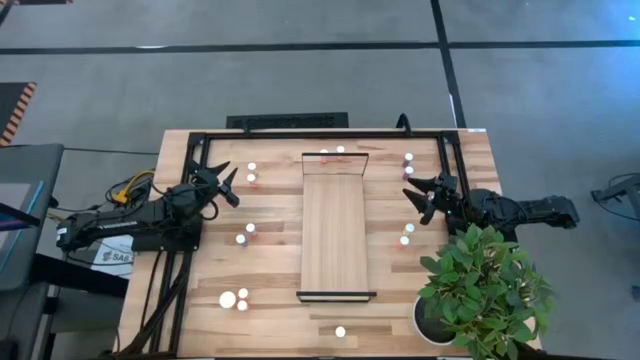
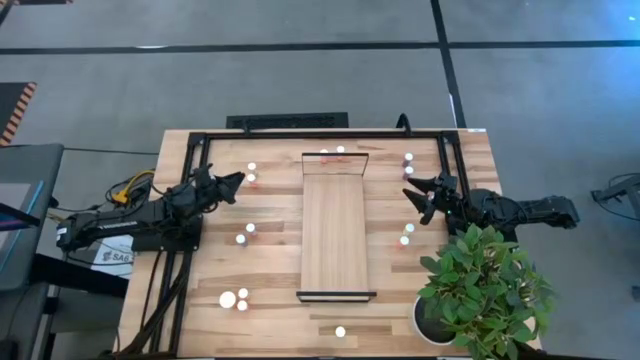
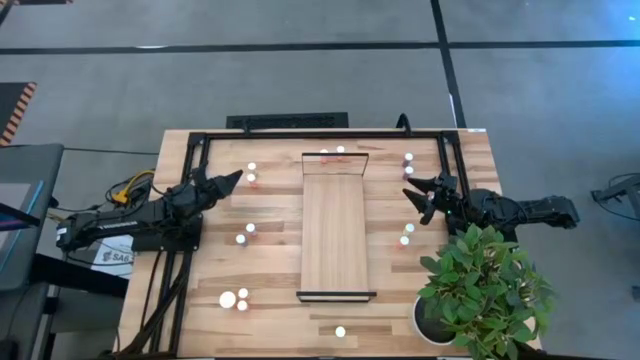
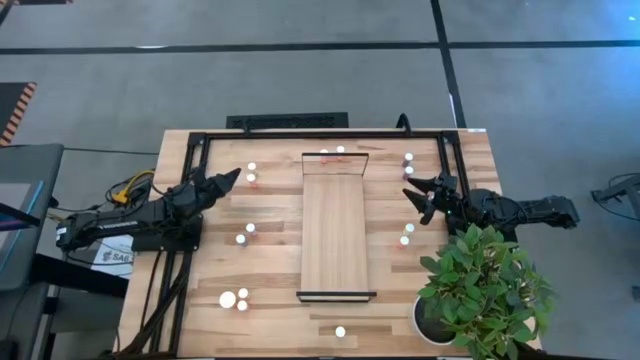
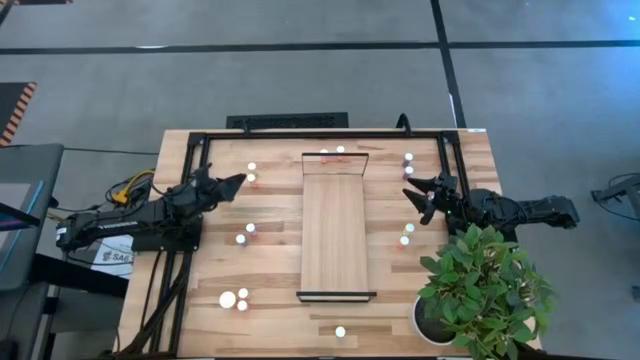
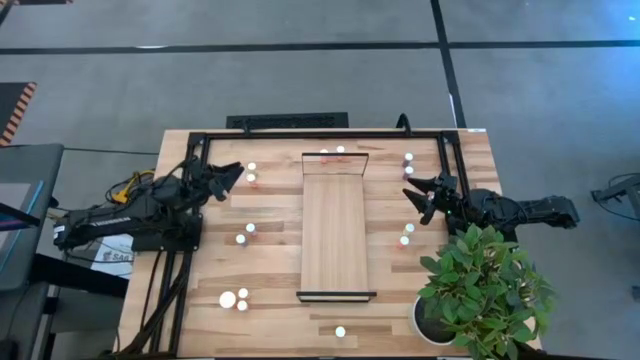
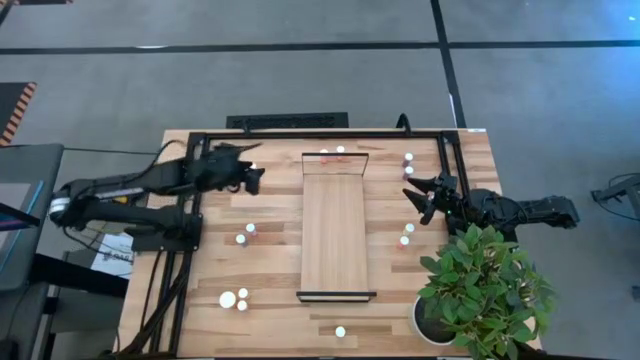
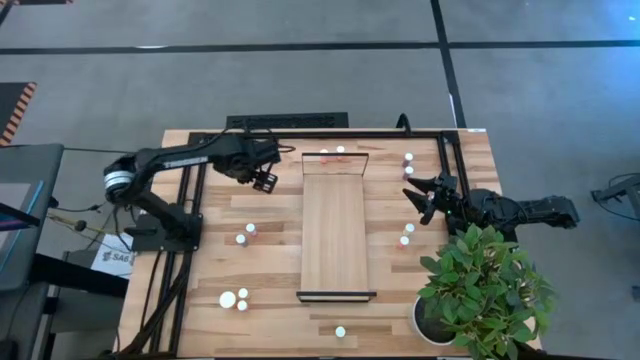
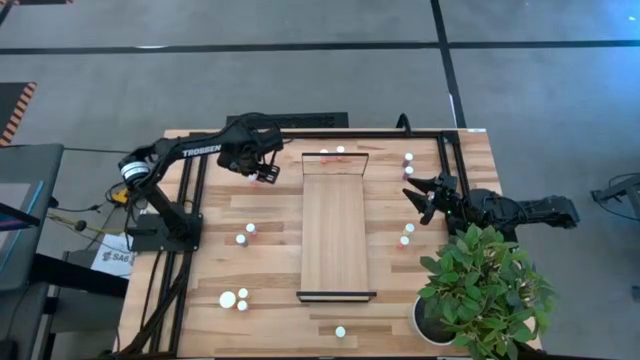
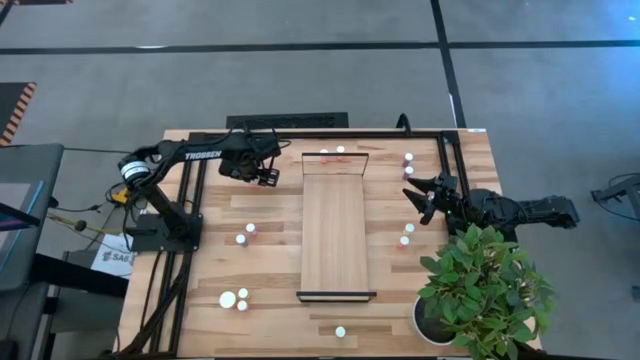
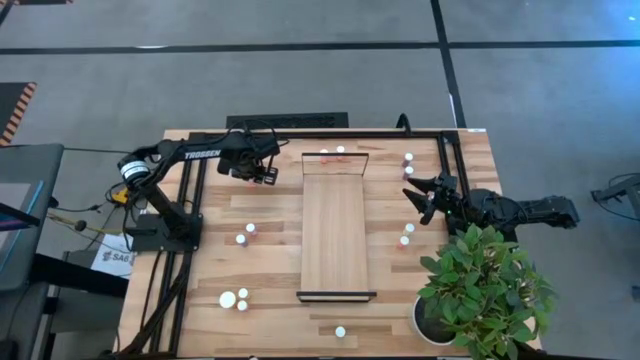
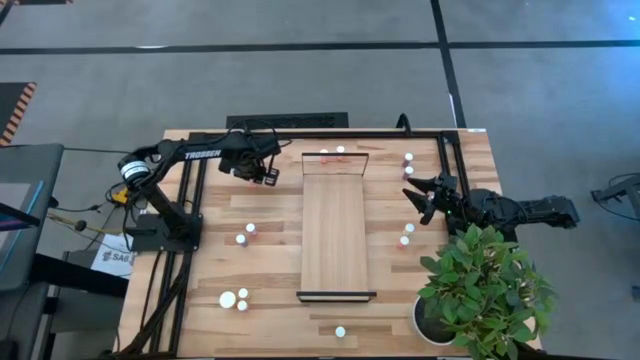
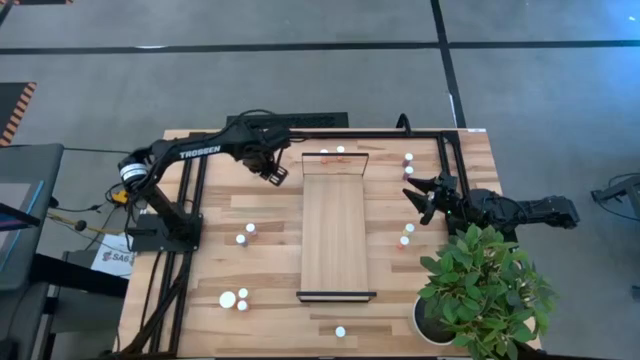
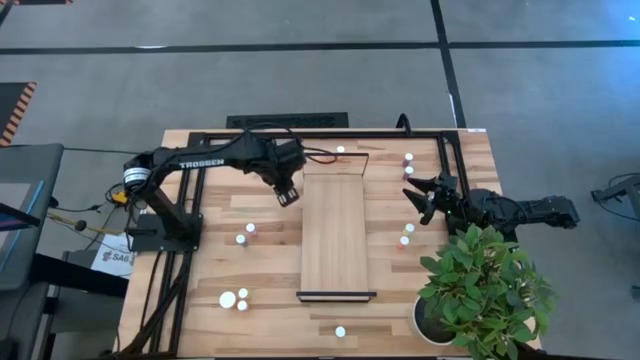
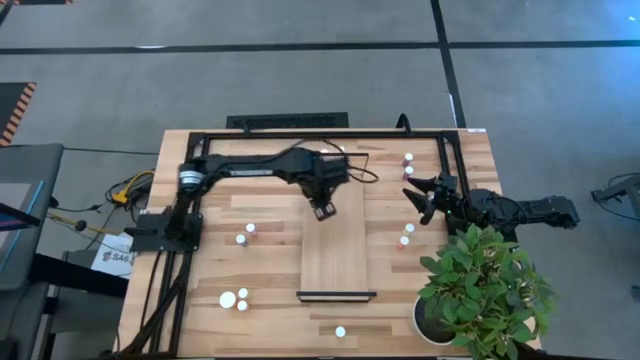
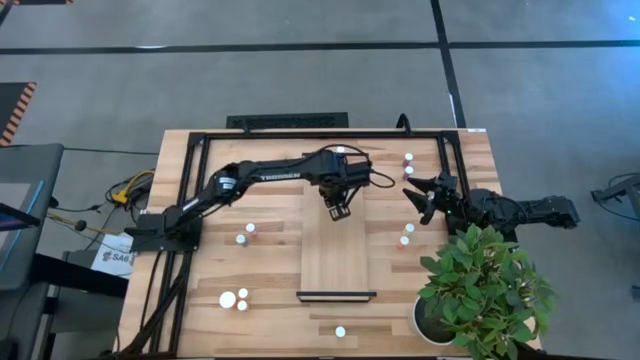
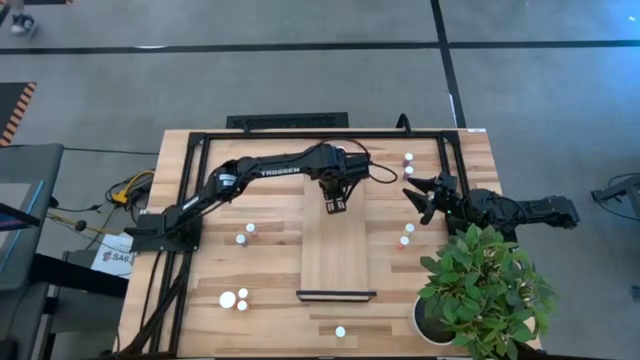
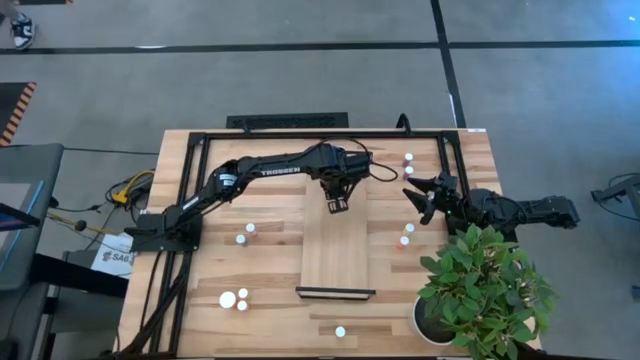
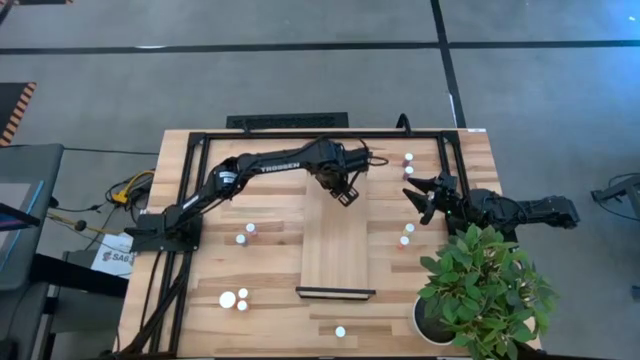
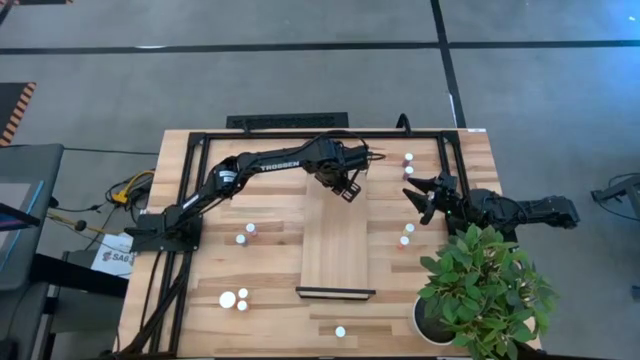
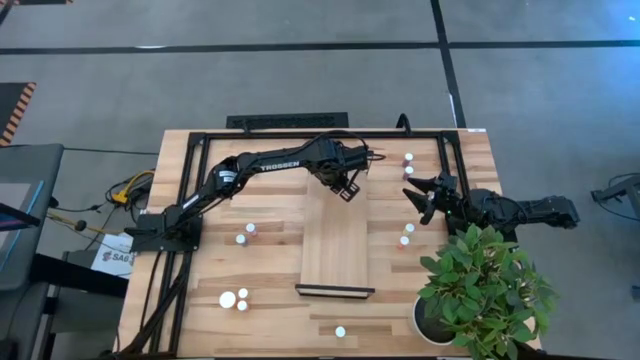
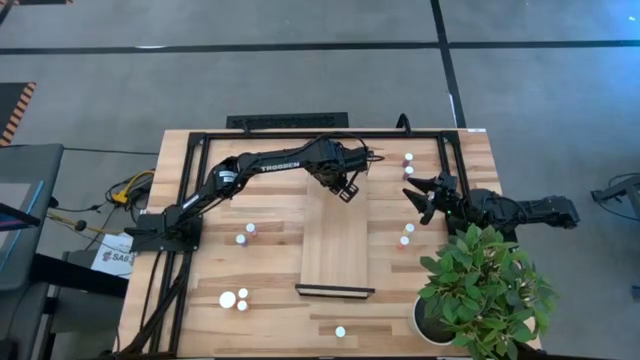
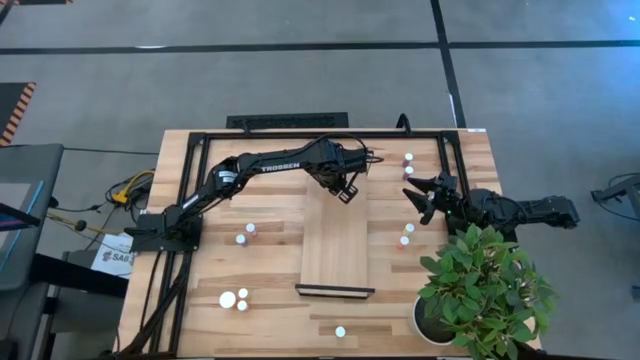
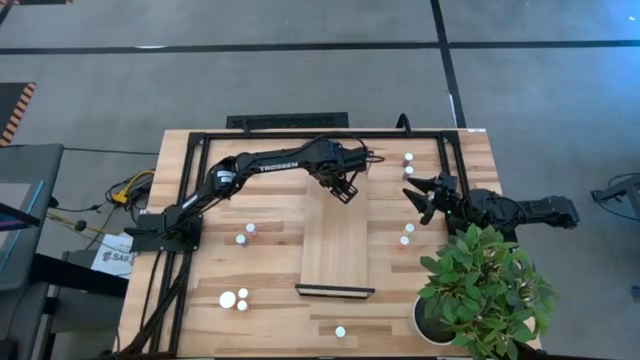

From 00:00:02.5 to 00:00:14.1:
Task: Pick and place medicine bottles onto shelf by color
Put the orange pill bottle on the shelf

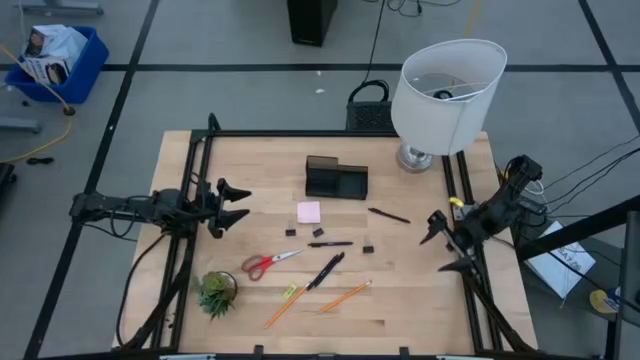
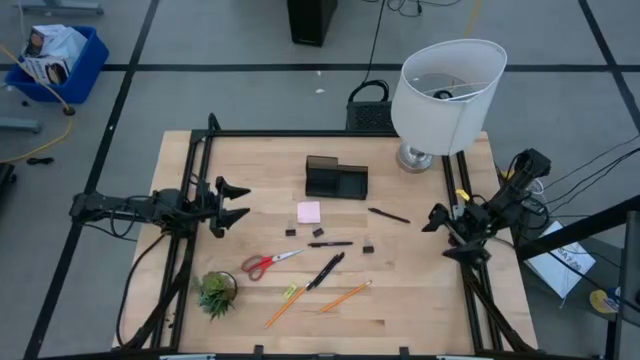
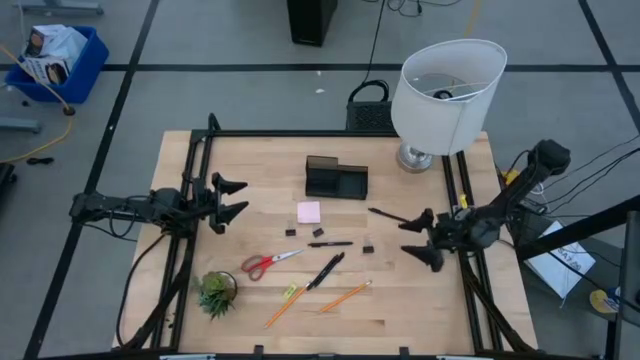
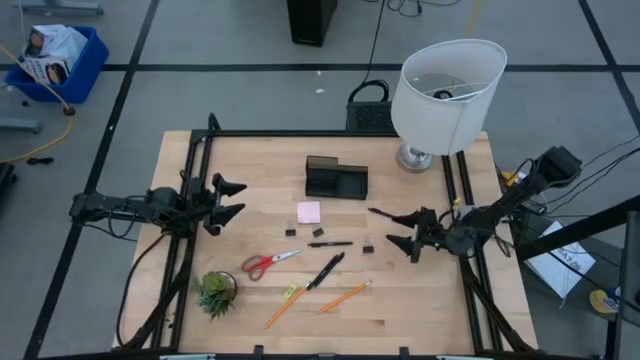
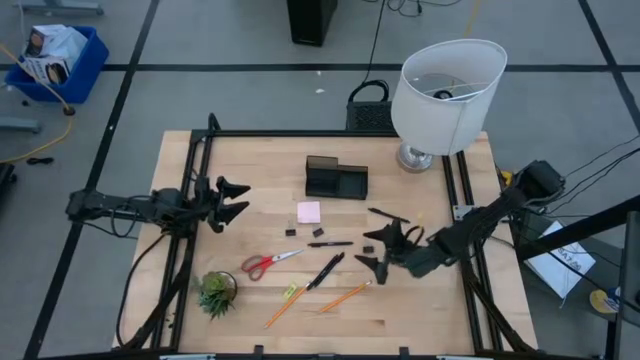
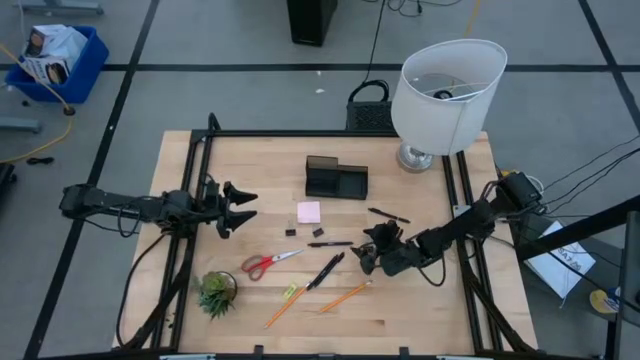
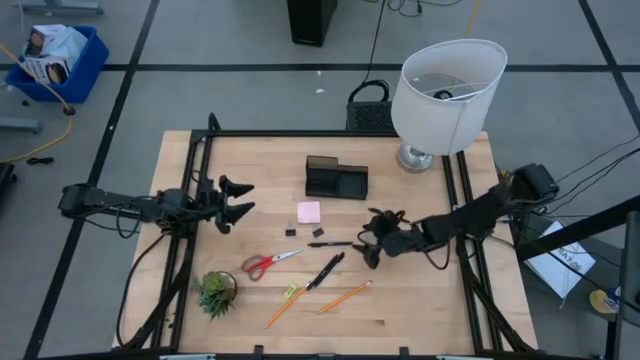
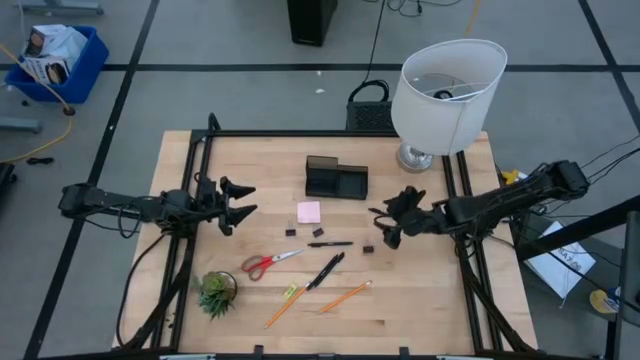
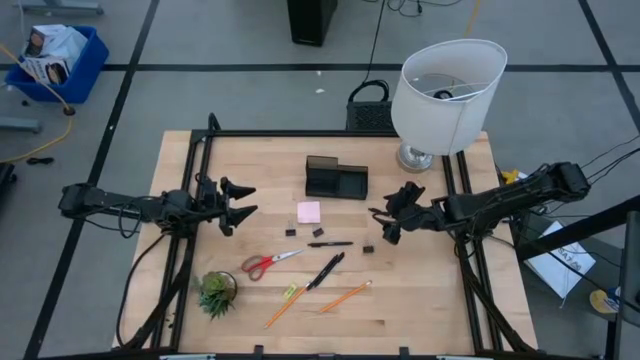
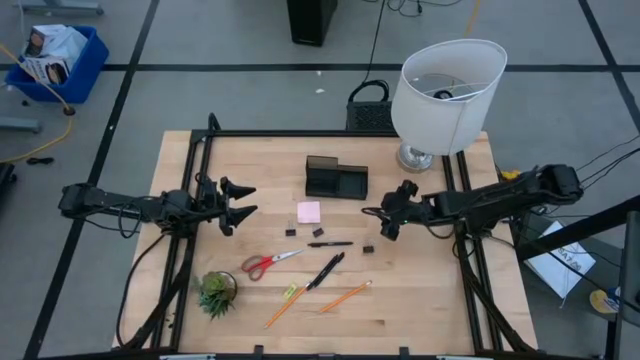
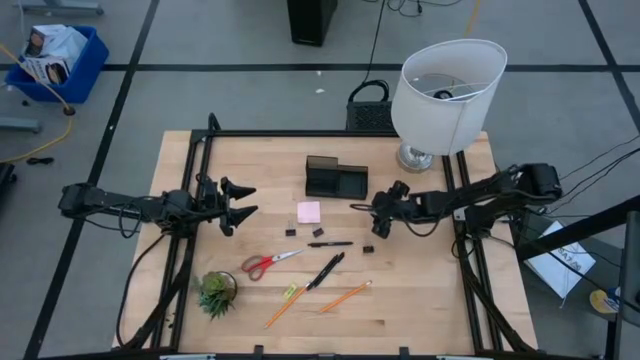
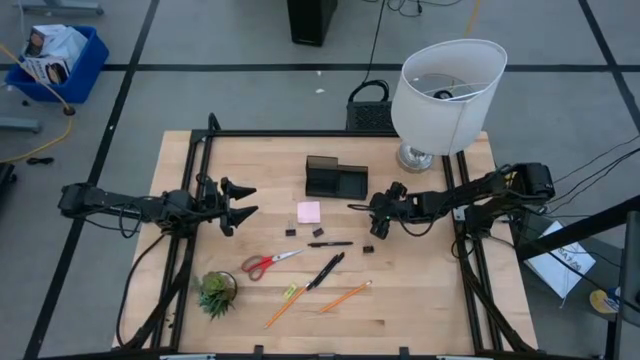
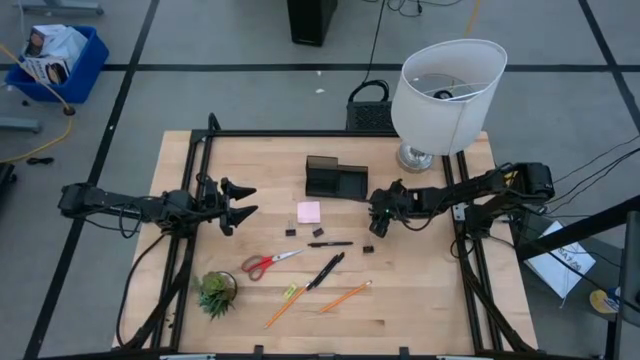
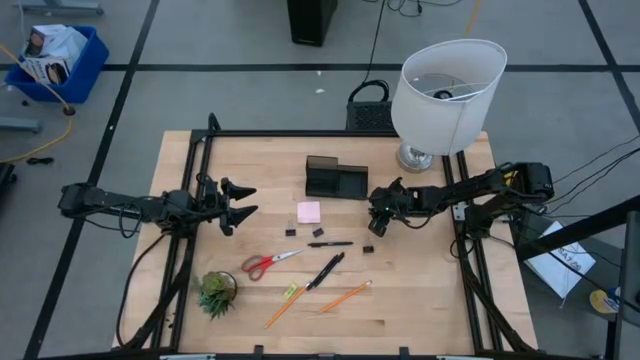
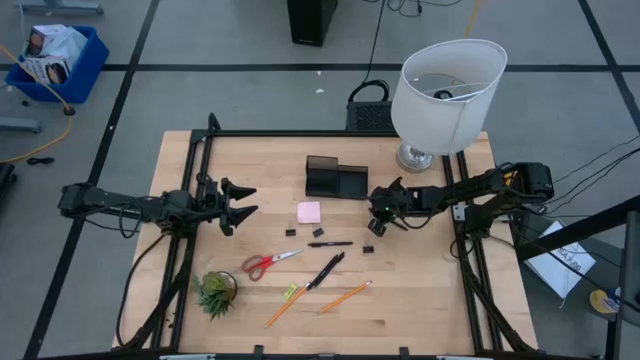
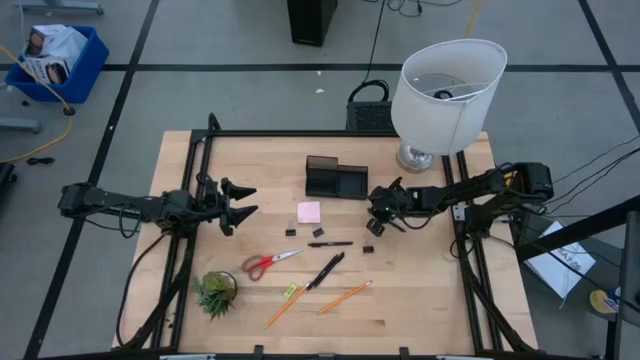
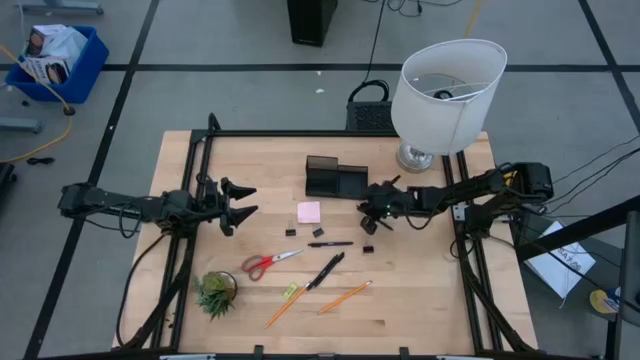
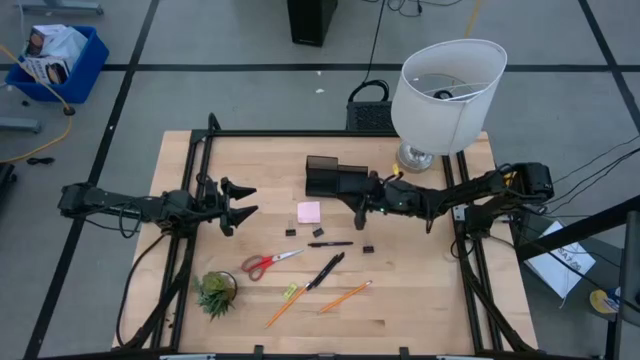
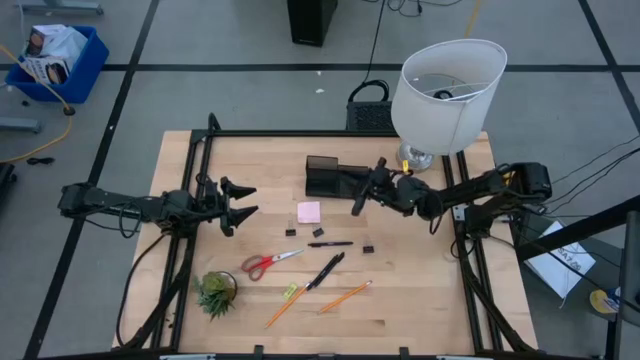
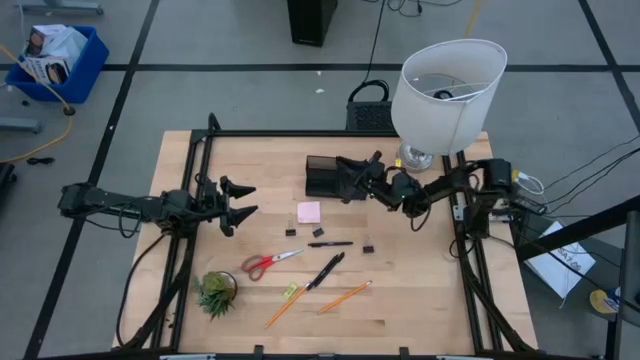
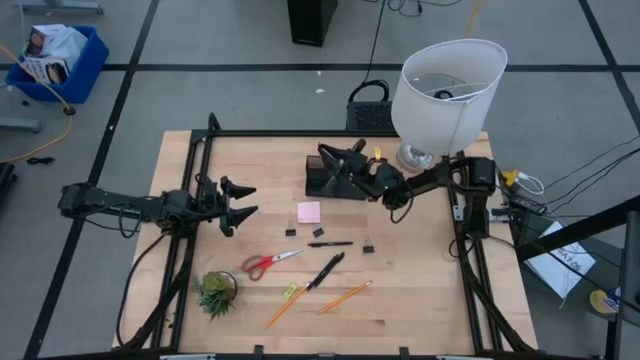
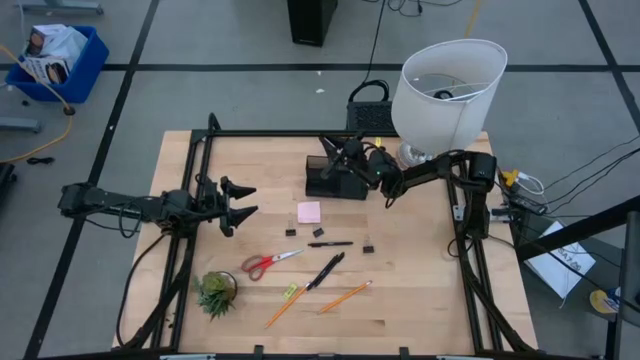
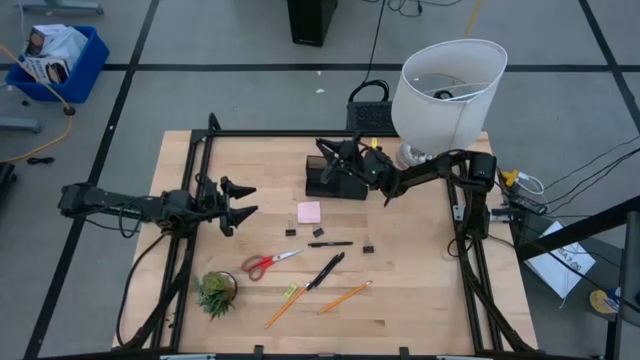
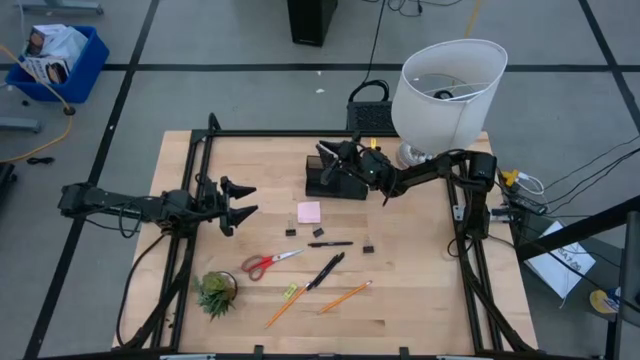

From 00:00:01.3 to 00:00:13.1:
Task: Pick and place office supplies into organizer
Put the top black ballpen into the desk organizer
